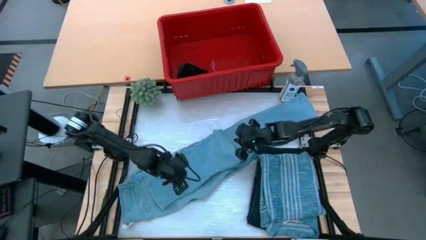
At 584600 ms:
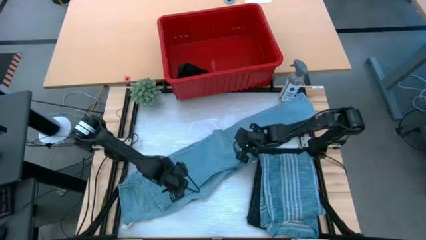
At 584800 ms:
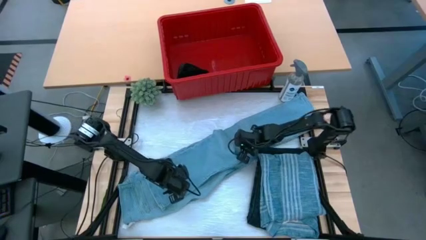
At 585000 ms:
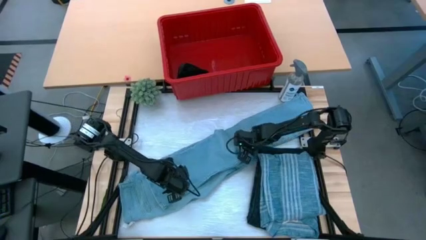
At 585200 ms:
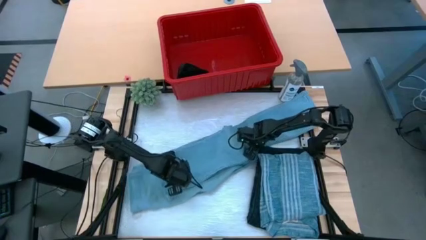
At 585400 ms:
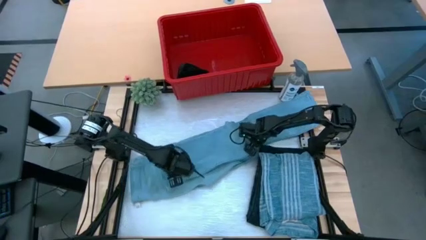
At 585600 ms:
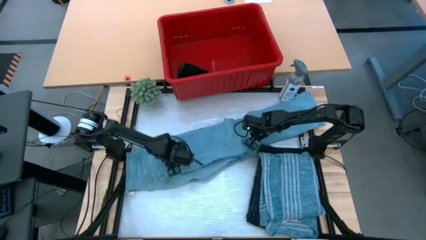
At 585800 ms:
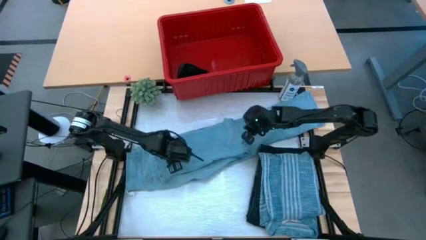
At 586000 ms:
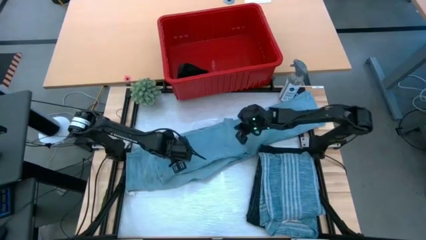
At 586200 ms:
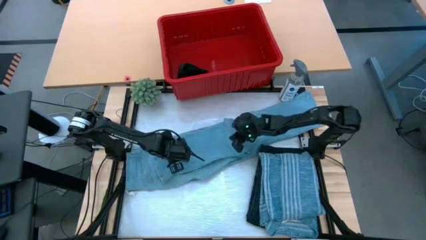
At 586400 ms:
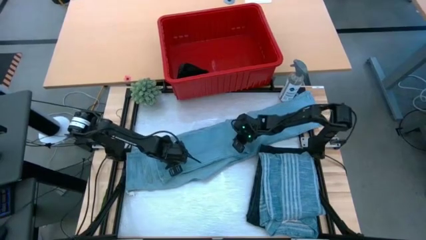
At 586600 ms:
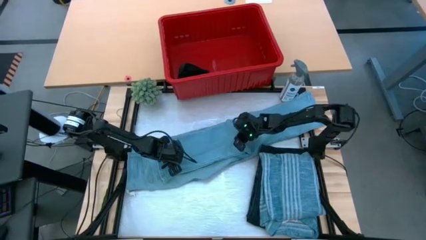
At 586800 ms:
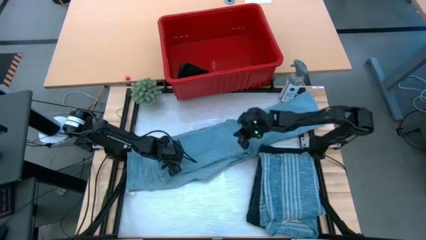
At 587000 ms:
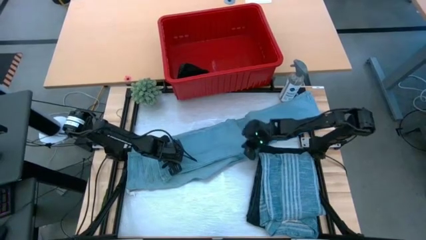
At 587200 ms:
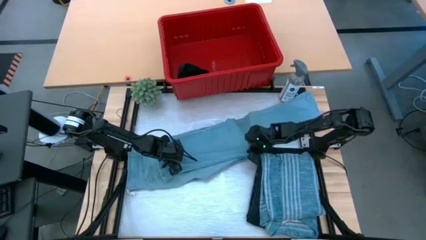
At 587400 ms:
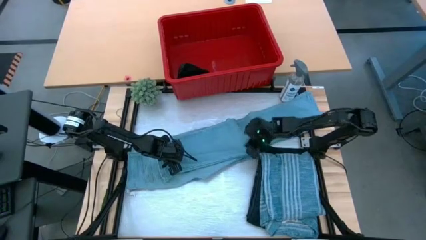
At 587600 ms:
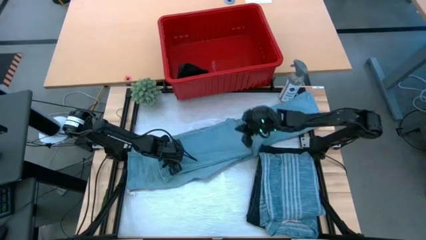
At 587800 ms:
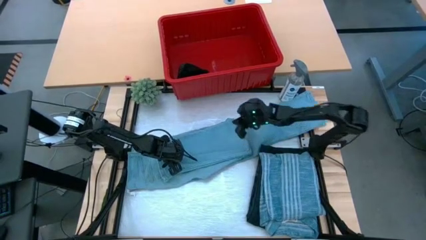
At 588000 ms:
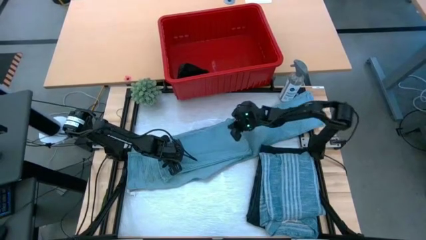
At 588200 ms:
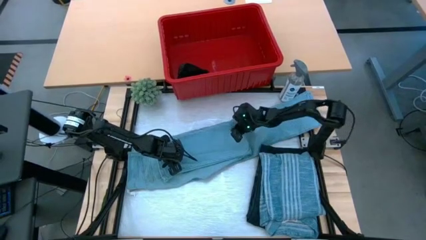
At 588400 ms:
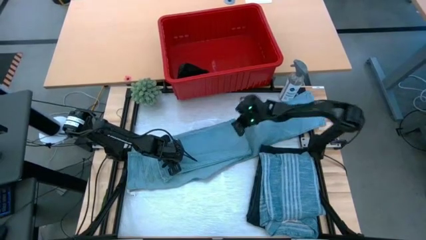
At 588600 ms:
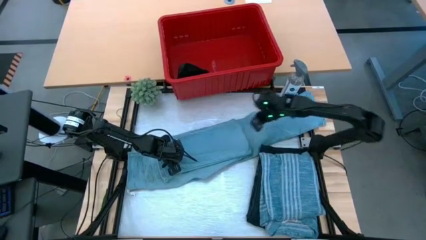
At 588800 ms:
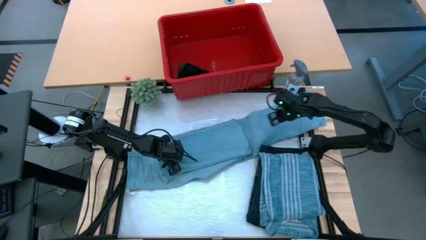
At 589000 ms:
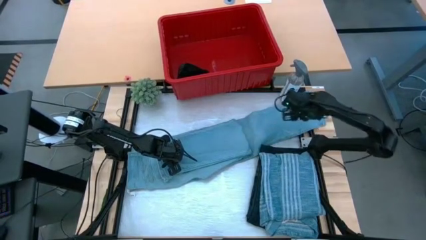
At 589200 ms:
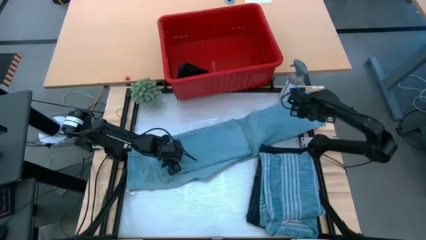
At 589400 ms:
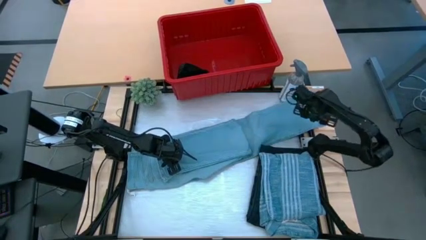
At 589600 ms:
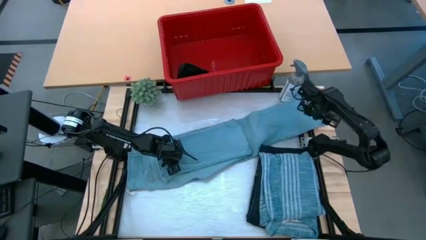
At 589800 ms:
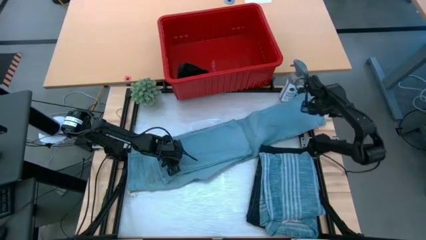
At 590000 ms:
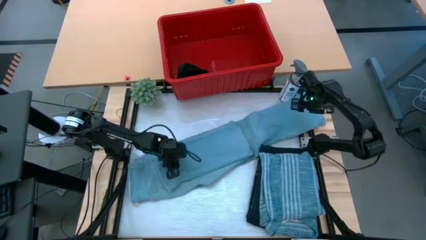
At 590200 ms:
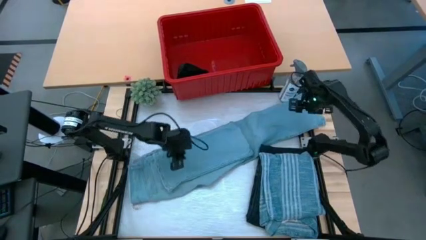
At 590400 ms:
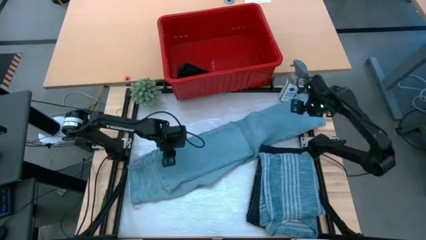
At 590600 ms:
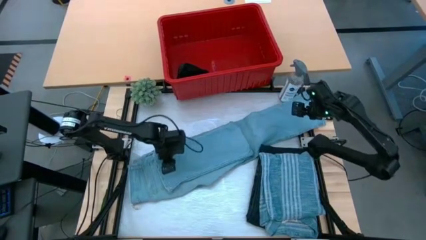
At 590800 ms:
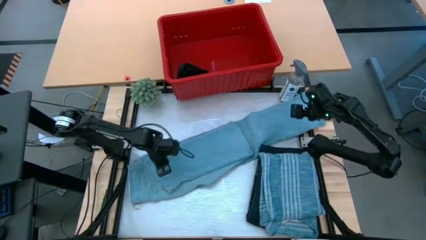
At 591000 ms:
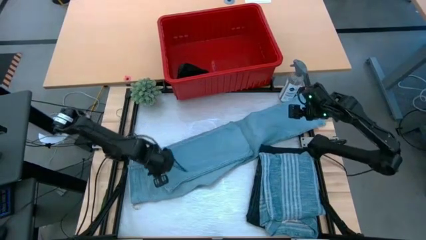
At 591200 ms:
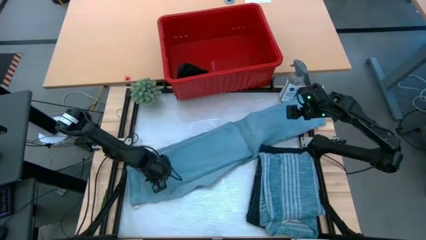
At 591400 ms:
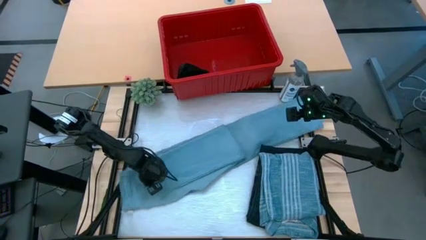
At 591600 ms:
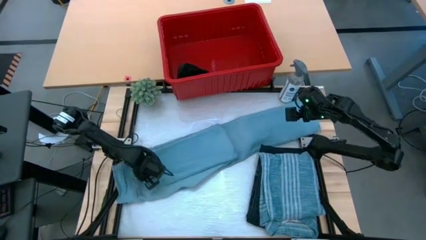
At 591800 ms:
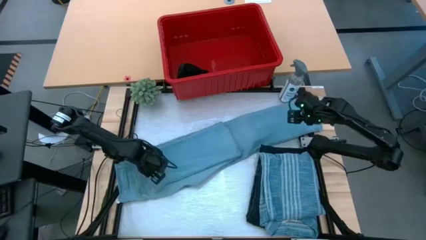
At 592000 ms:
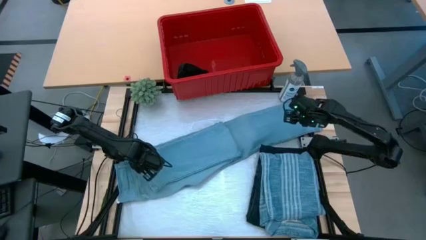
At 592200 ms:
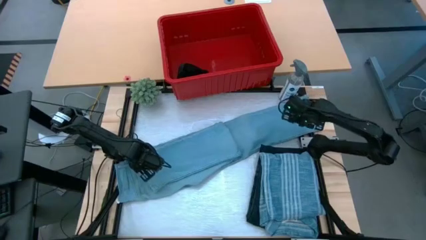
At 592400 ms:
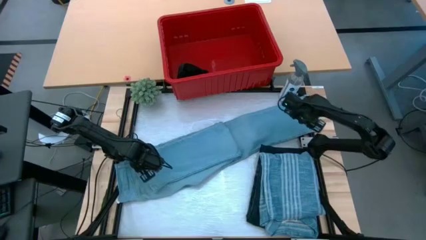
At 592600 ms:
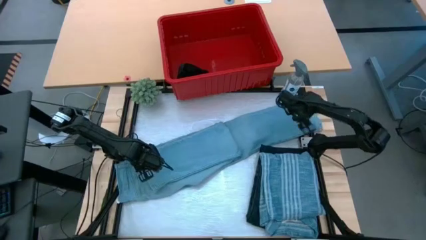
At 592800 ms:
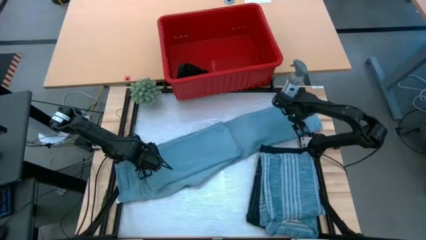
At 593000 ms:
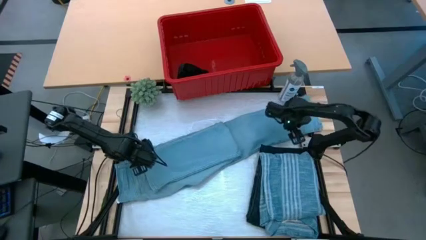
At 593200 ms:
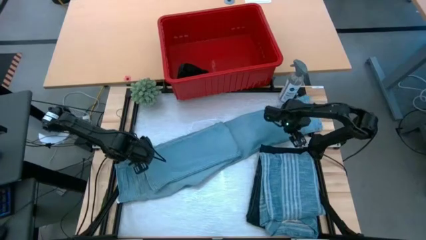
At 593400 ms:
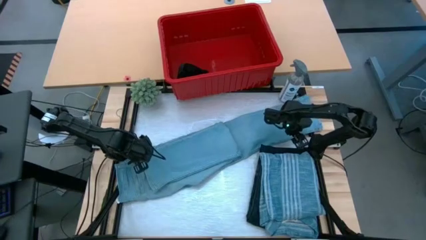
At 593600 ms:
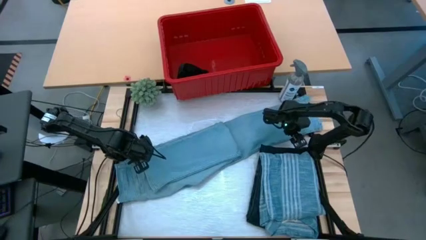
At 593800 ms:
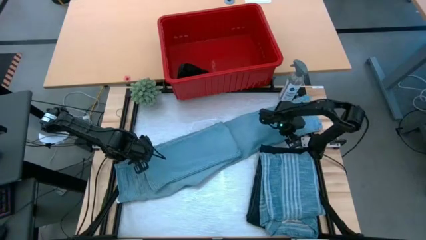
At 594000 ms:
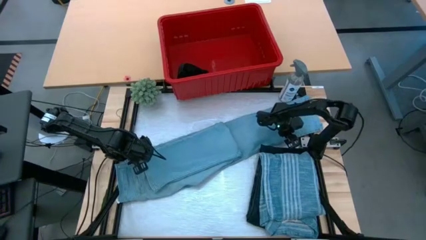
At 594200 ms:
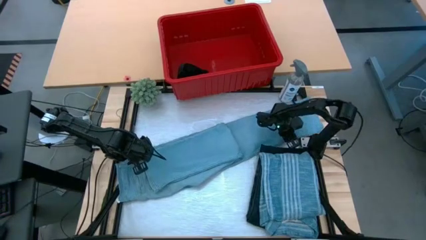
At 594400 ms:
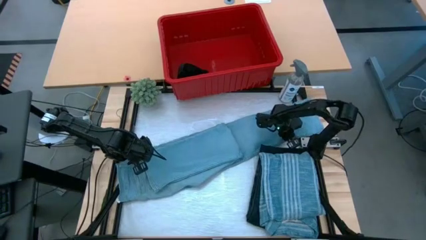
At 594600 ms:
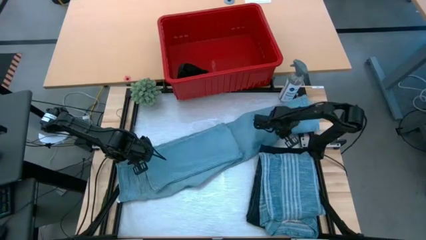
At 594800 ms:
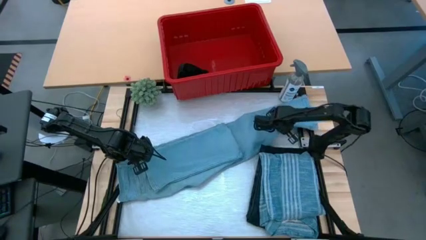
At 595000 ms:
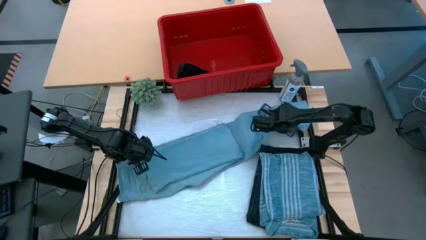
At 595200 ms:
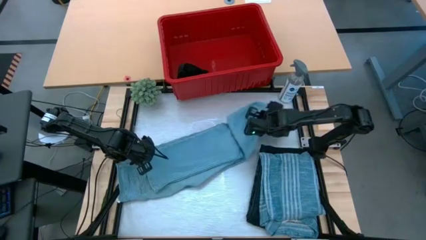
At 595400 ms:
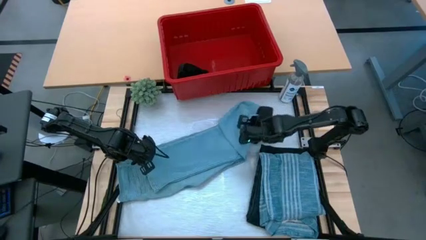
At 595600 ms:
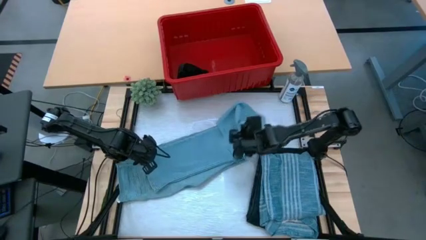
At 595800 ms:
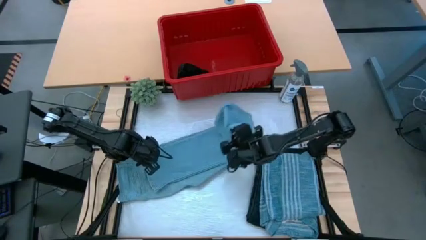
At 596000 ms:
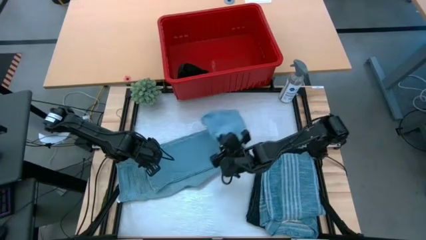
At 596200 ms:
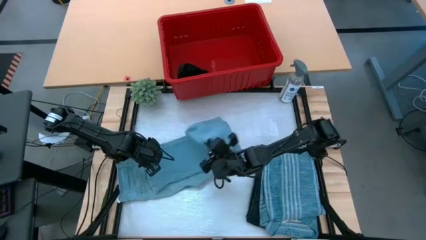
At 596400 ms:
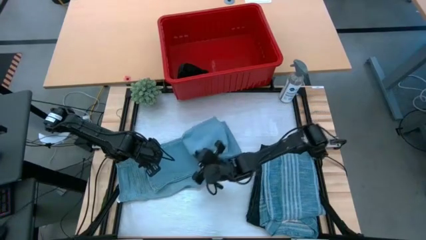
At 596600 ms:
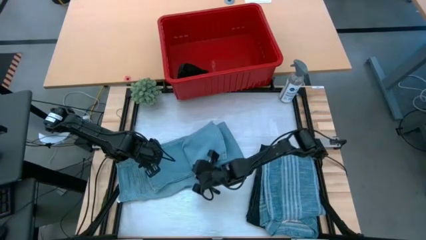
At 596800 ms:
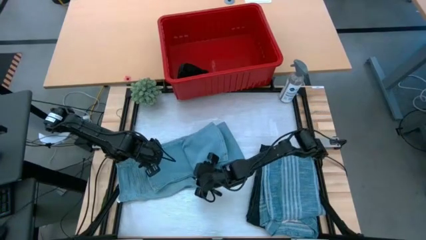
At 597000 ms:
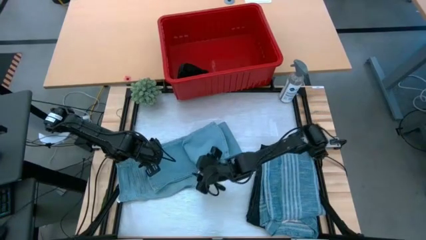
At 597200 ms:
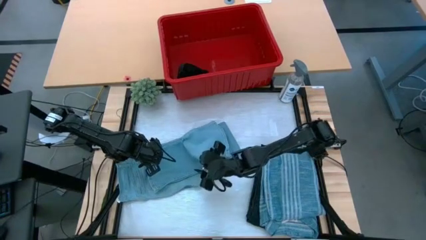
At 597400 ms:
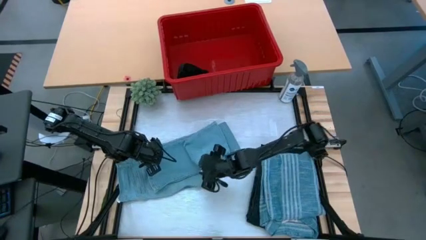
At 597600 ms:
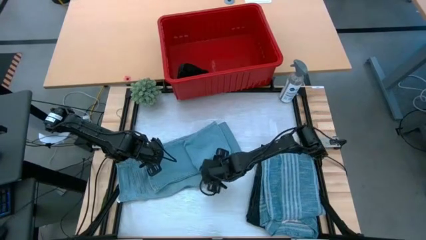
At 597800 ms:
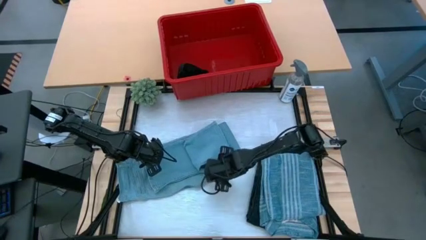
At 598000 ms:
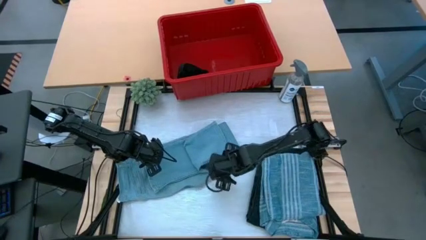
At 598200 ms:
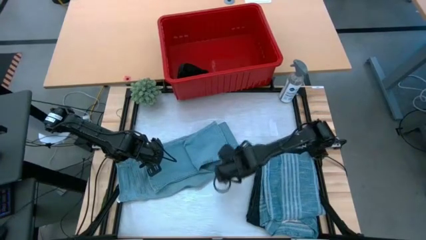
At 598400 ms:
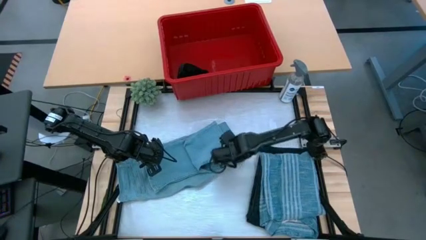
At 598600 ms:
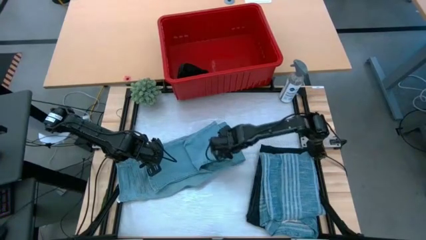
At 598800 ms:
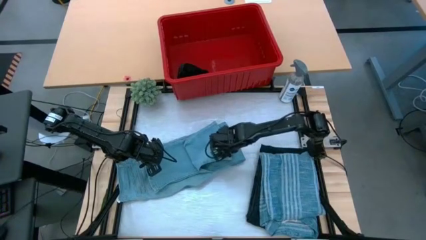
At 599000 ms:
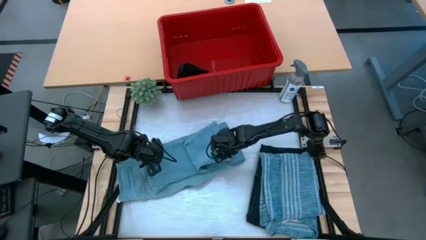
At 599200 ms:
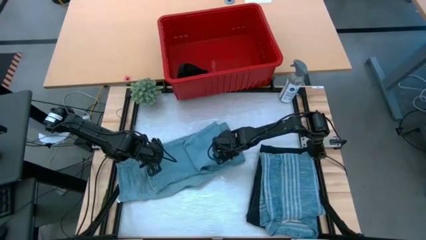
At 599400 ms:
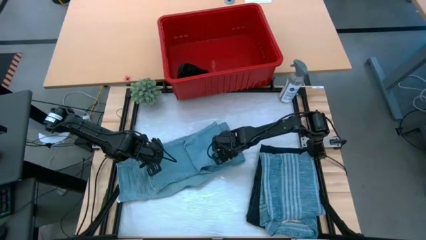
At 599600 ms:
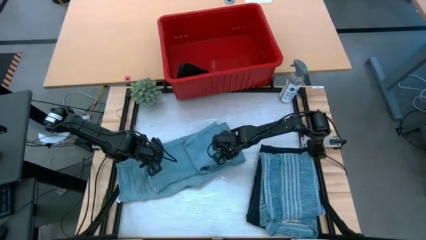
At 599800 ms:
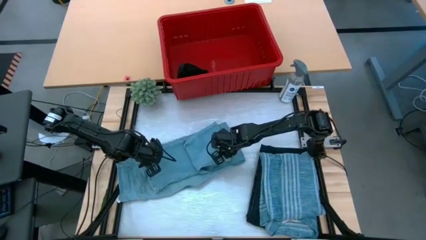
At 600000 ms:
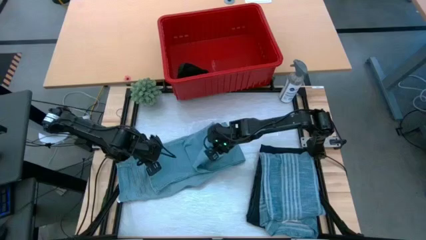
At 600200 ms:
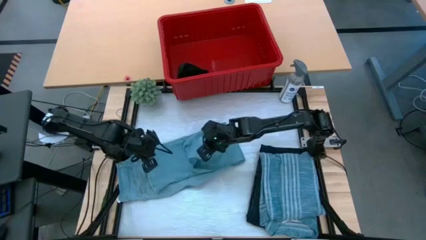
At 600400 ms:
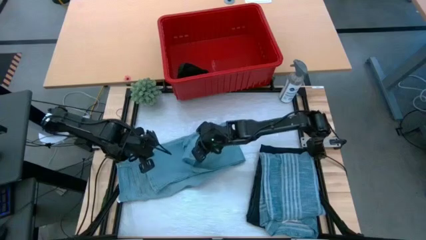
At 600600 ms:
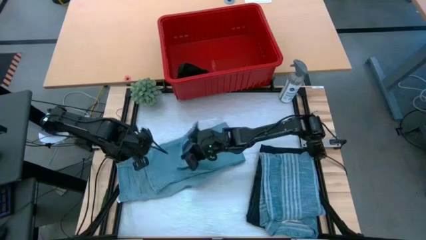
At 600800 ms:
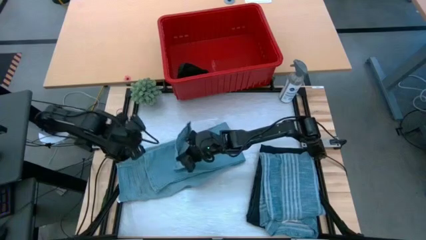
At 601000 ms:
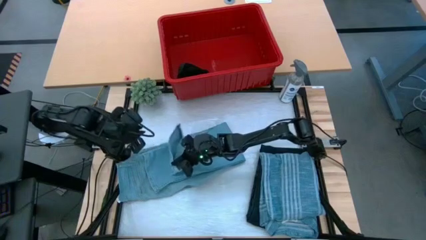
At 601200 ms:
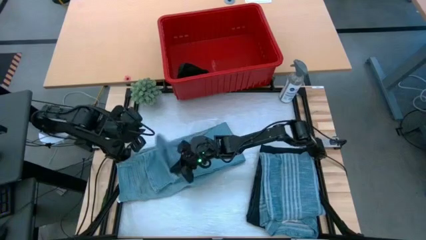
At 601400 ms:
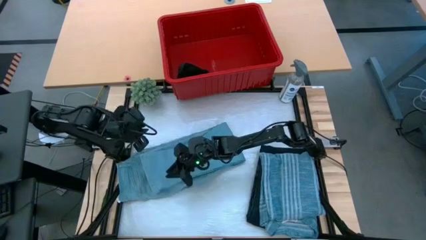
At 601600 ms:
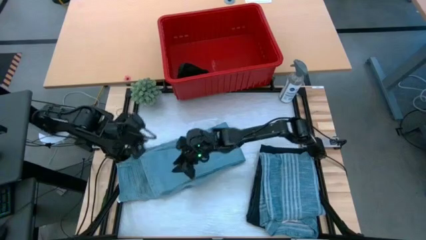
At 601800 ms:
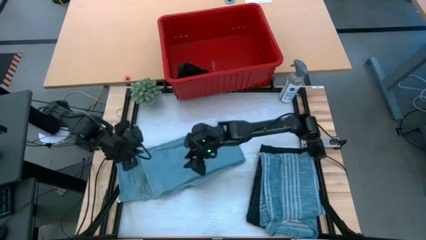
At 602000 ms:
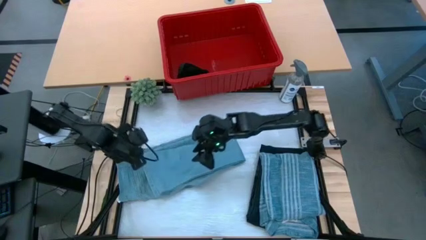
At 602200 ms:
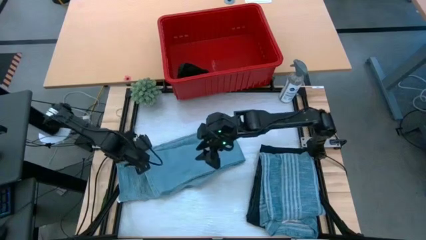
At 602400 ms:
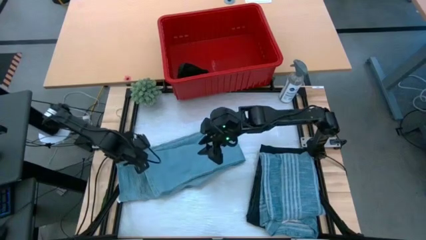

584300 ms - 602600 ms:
Task: Fold Laundry from Bin
Fold the light blue denim pants
